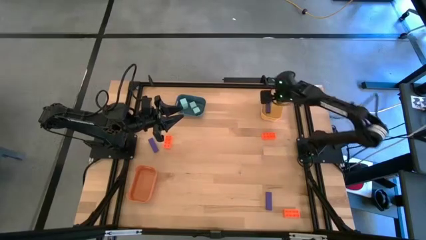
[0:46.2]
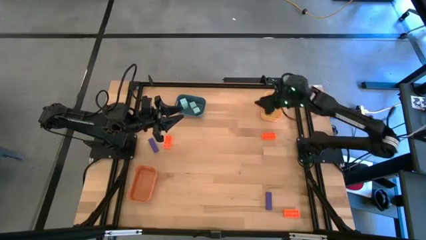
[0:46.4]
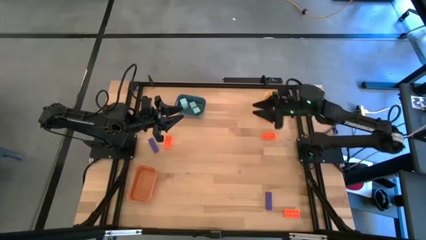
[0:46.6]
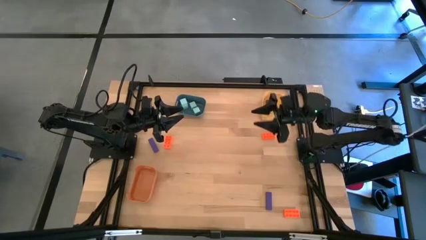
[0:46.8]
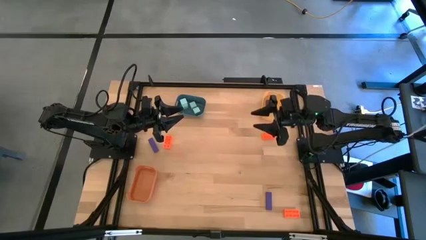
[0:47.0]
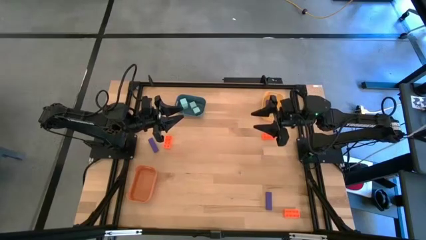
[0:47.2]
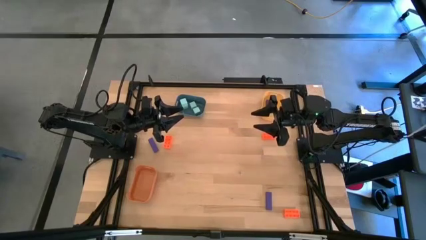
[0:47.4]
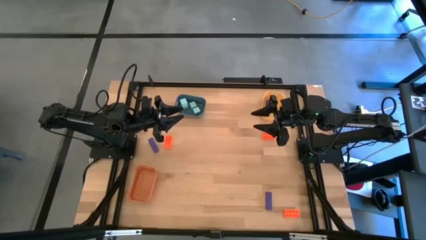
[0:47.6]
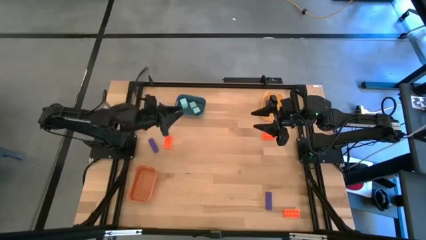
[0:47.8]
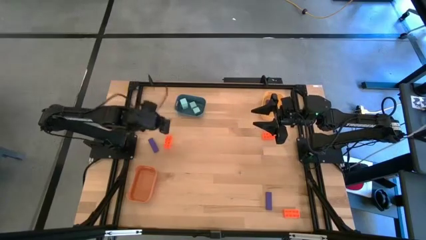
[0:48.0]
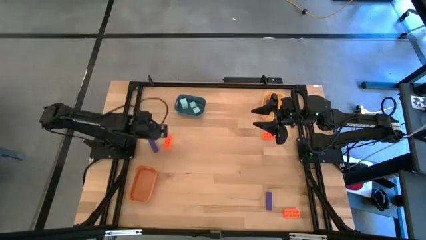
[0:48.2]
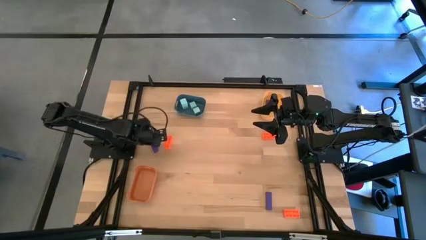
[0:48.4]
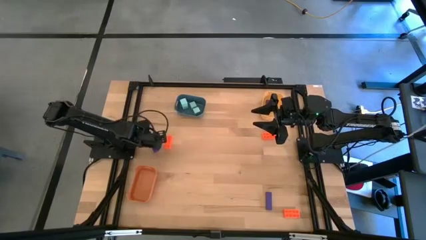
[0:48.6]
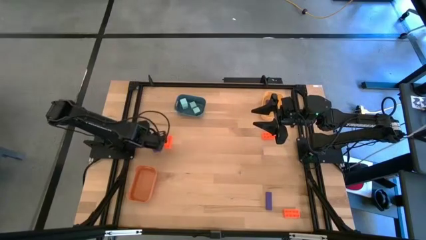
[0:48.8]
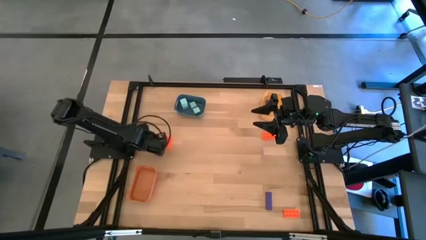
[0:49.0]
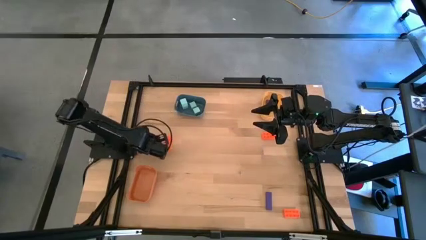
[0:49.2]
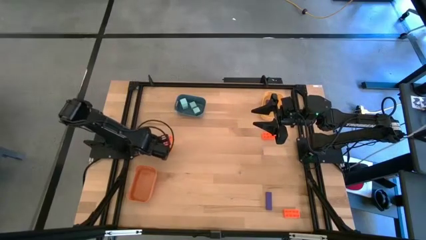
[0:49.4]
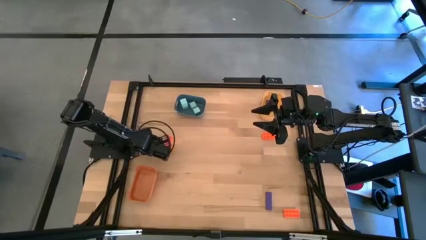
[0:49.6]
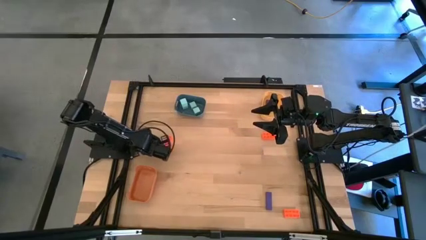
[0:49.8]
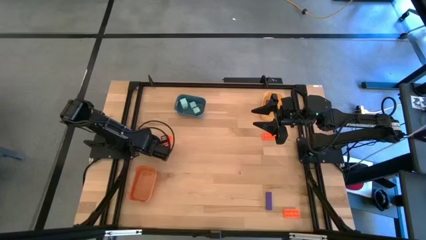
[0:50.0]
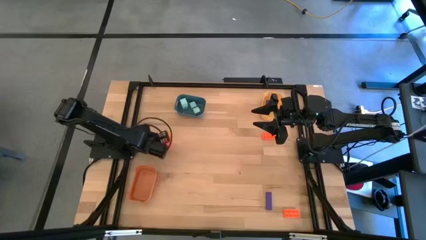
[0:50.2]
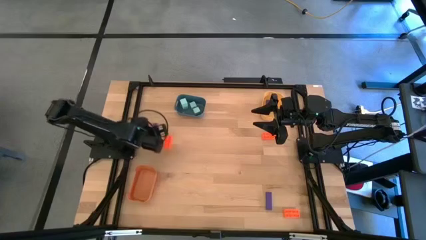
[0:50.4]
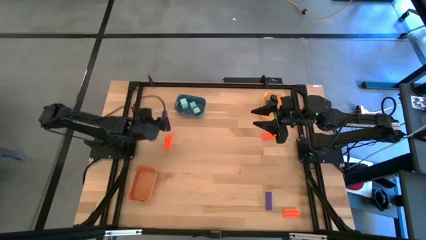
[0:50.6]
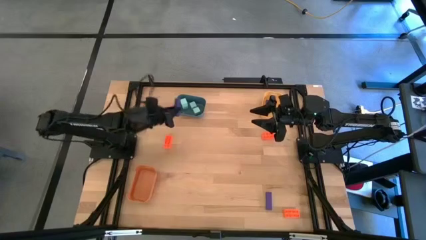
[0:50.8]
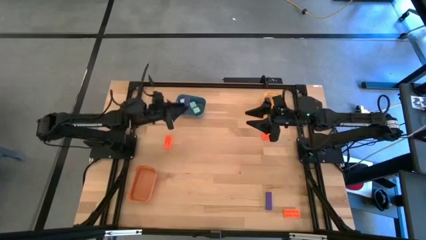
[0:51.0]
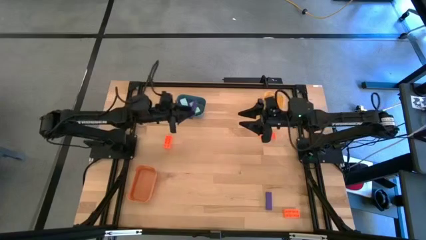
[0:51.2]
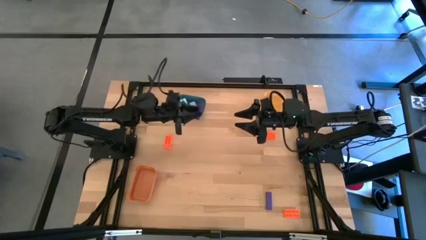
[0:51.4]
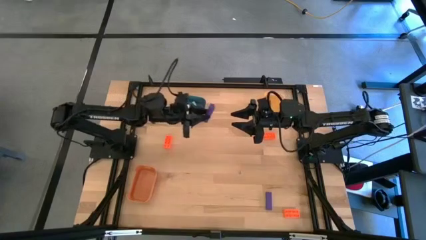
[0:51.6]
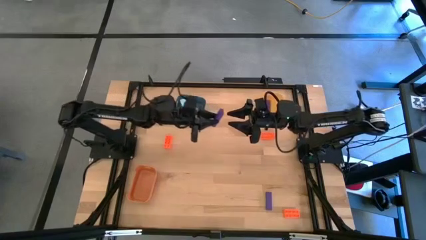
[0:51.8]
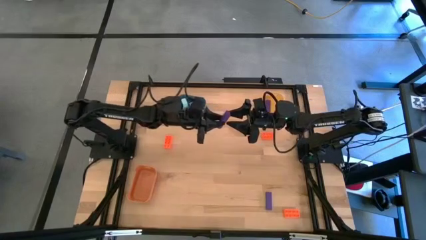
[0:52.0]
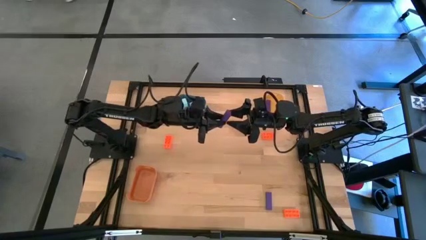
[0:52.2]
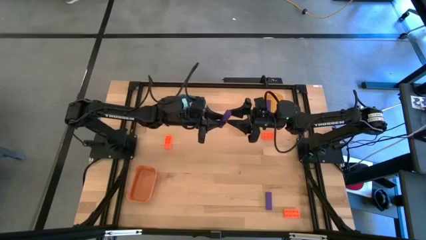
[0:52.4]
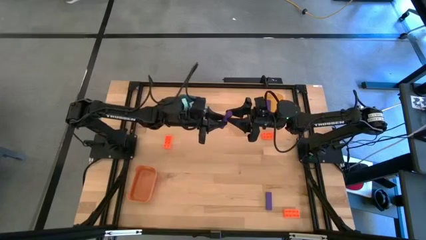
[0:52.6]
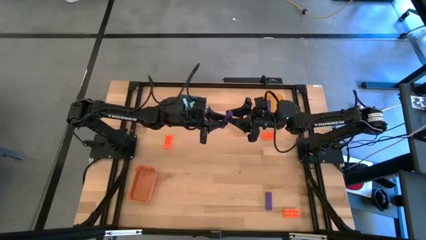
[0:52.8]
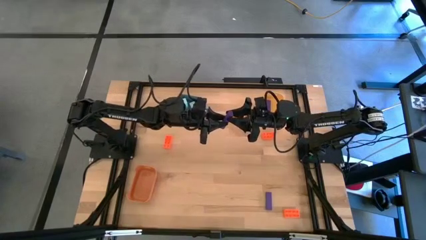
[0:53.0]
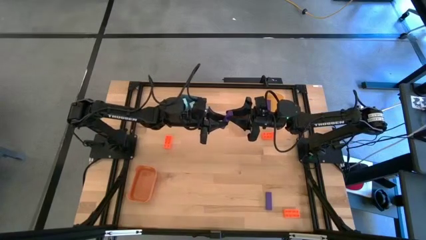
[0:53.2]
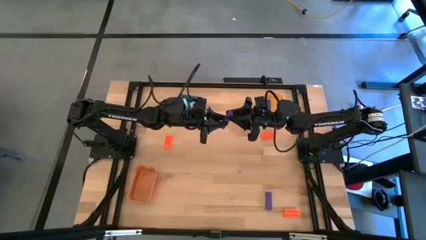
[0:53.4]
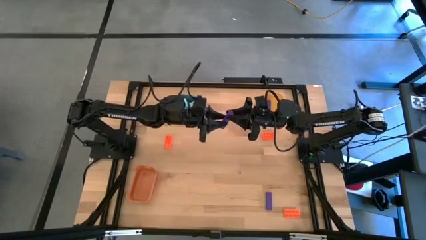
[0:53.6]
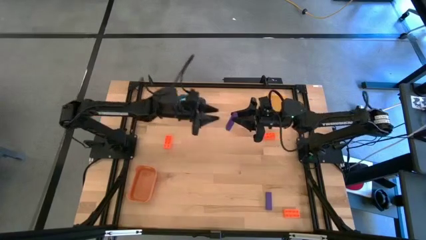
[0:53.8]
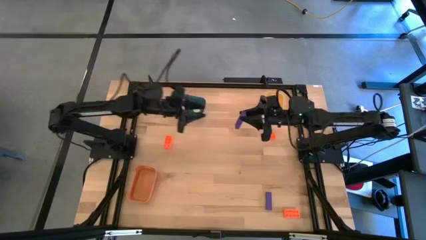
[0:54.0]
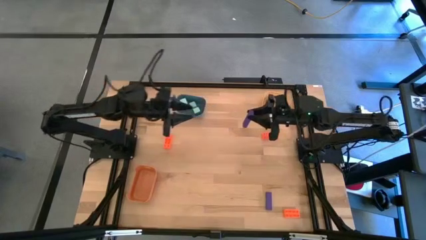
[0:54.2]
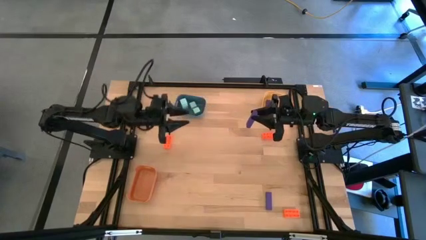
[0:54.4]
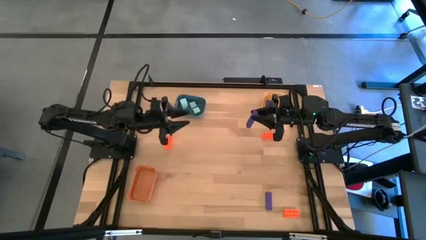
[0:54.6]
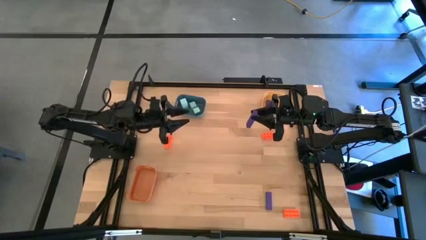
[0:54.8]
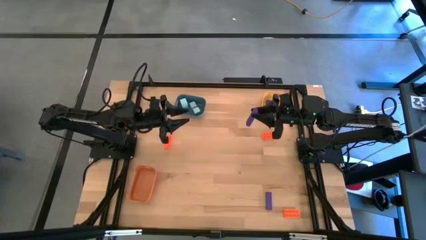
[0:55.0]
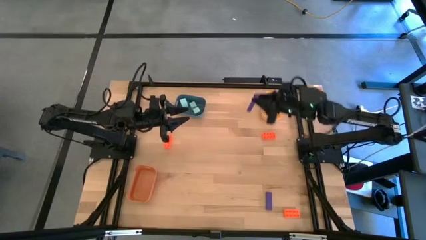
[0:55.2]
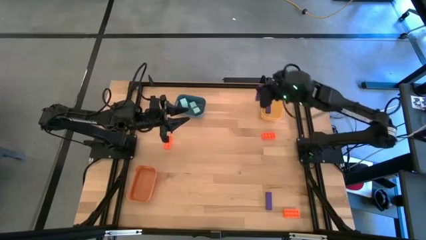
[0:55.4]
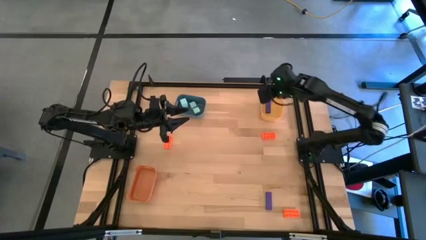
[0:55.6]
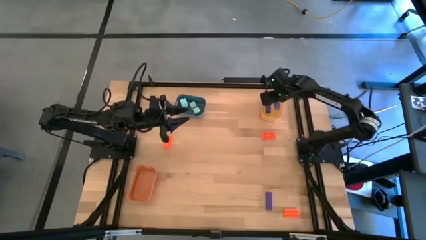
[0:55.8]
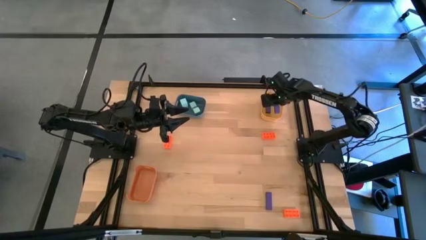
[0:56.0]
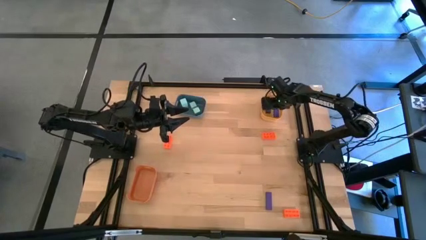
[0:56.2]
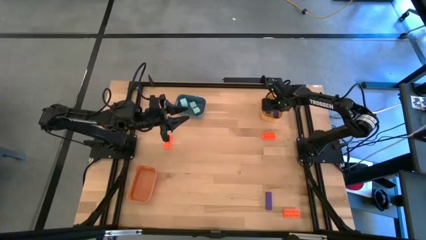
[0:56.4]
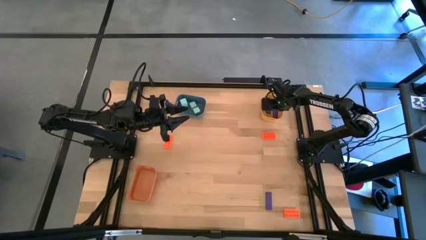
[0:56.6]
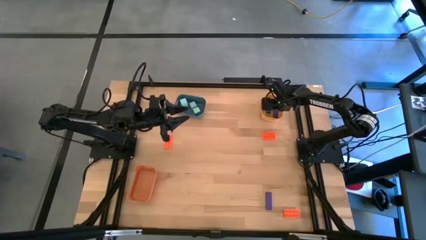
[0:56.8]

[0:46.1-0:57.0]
Task: Sort & place blocks by color
Put the left purple rectangle block into the yellow bin

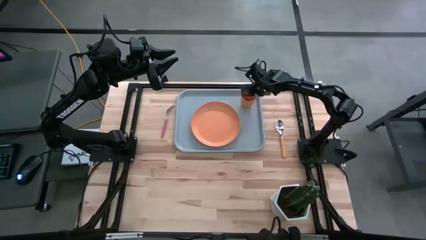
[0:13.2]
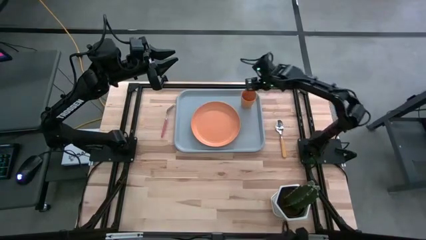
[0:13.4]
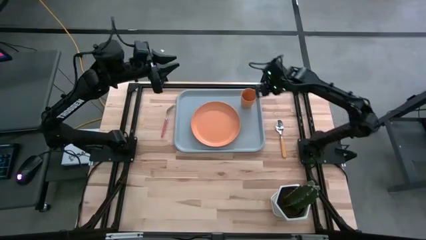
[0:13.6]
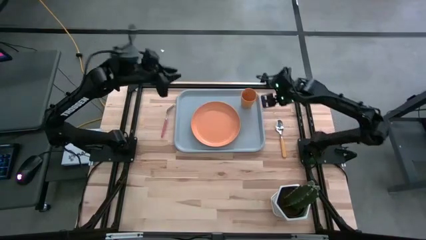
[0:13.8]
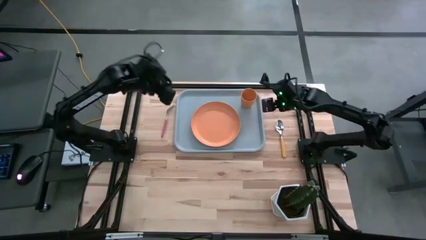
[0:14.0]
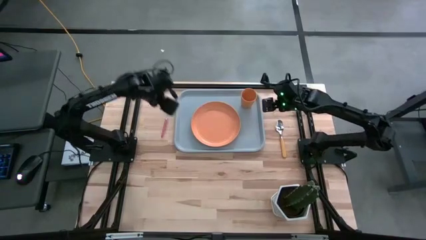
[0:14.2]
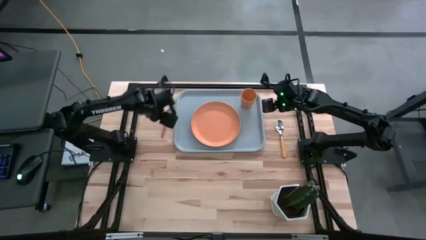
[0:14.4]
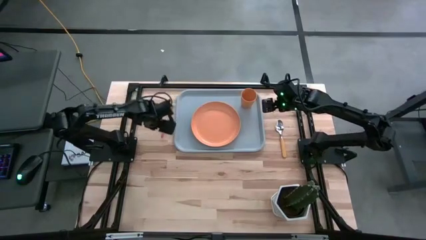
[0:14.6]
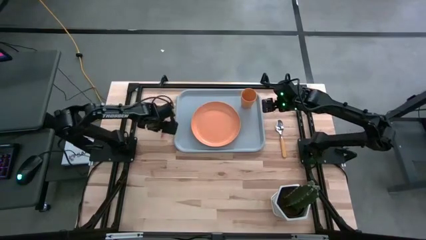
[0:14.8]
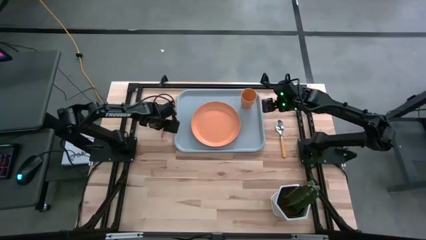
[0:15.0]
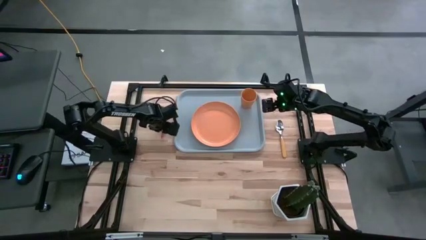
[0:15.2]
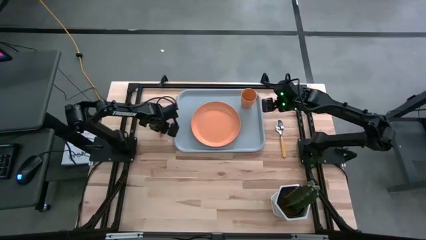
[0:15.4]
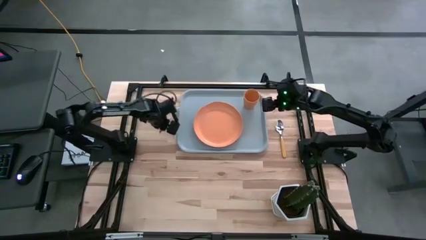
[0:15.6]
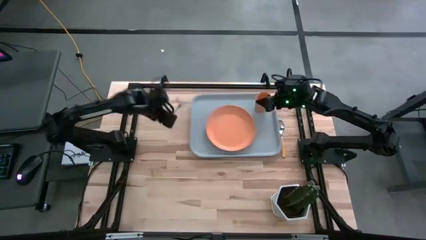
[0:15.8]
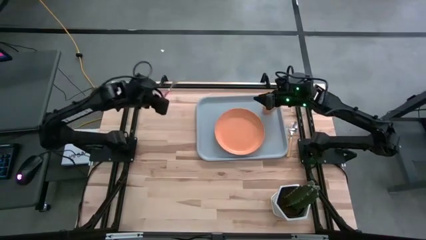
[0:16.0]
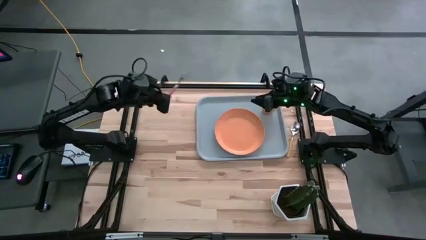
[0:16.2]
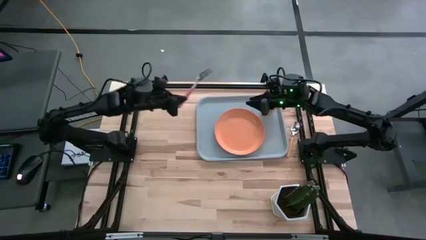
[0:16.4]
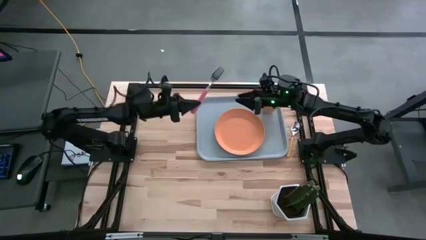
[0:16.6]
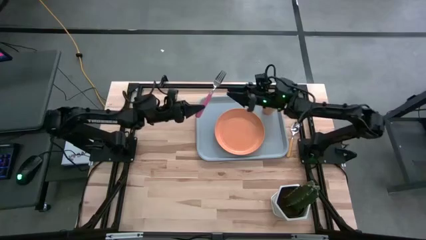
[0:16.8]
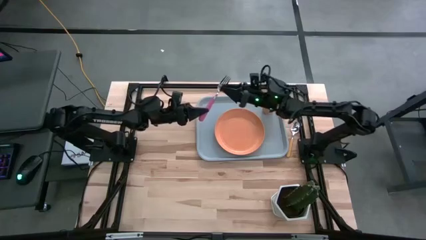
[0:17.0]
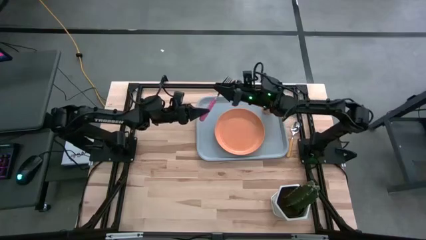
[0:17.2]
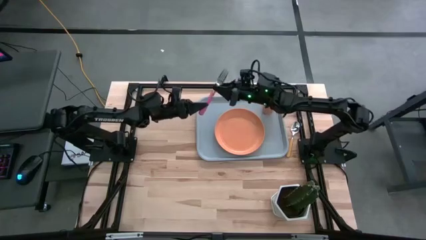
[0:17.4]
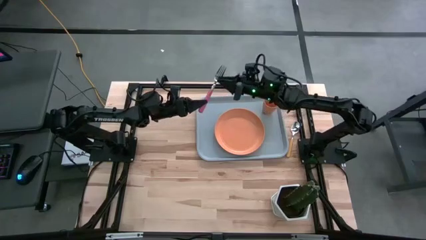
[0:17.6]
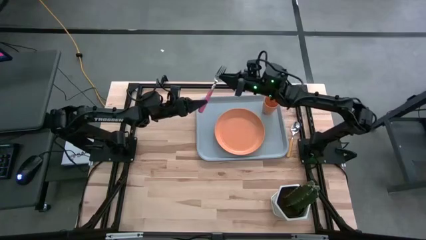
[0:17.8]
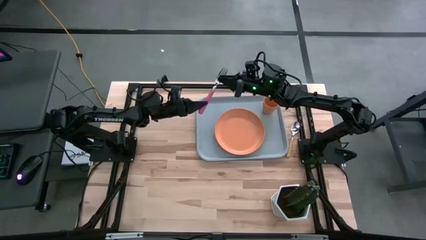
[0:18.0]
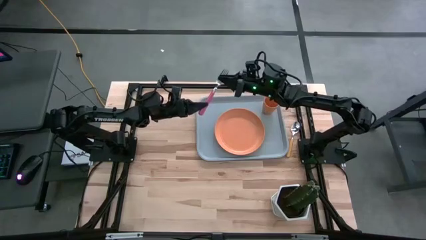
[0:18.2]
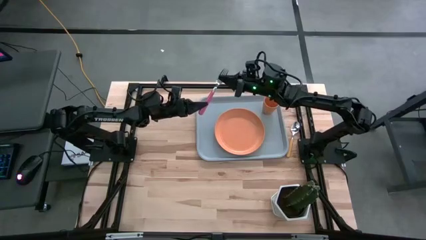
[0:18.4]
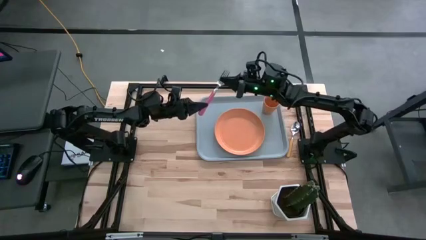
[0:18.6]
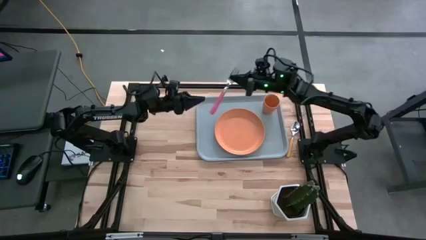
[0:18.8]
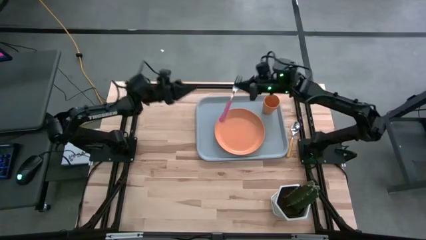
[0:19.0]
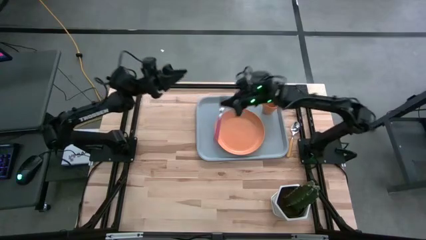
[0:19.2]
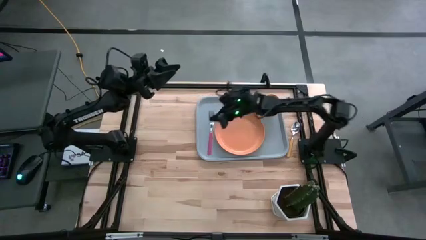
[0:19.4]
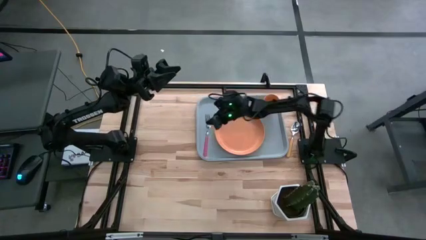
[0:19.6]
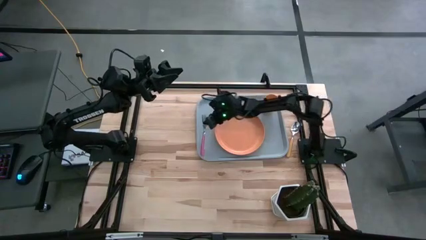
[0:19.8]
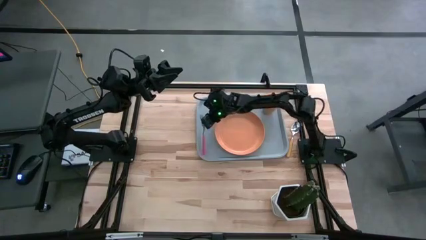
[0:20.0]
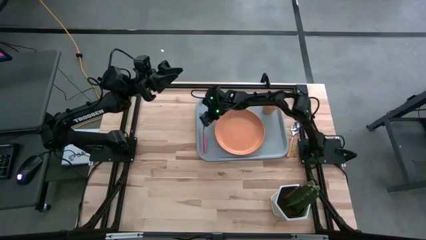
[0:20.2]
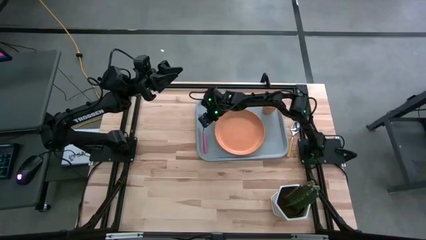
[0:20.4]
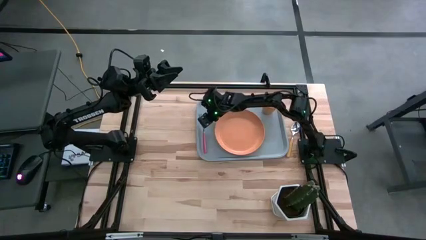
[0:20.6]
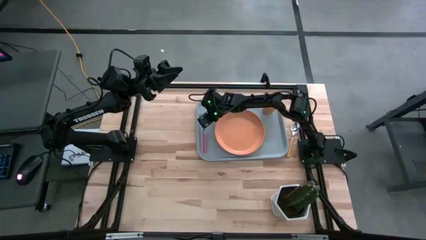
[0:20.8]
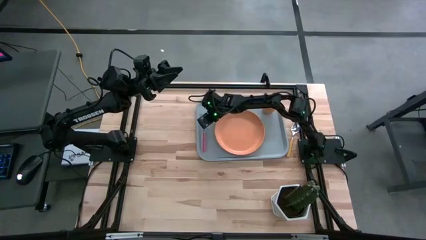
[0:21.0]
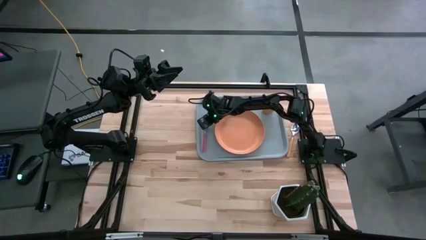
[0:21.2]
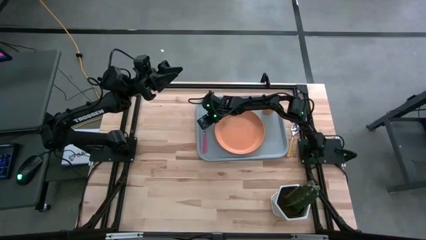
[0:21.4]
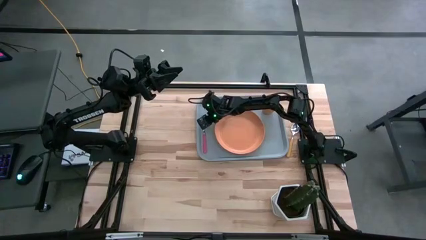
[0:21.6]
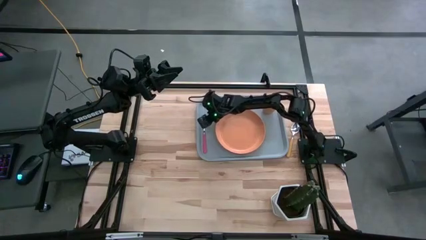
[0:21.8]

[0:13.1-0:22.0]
Task: Pick and place plate/cup/fork/spoon on tray
Put the pink fork on the gray serving tray to the left of the orange plate
